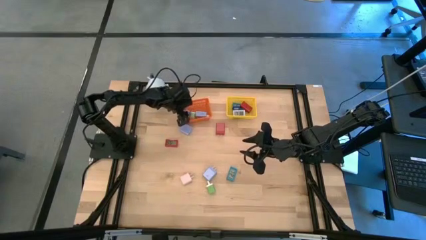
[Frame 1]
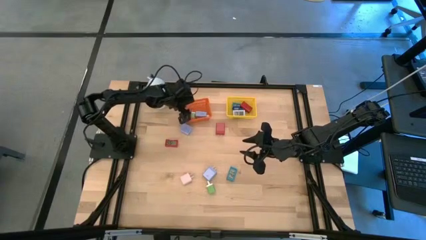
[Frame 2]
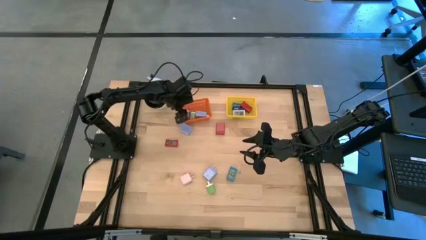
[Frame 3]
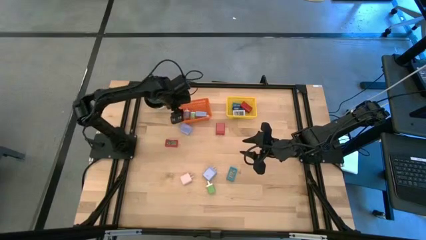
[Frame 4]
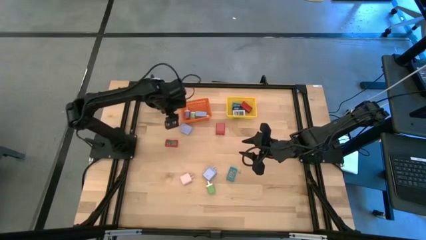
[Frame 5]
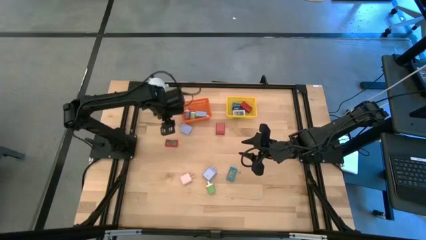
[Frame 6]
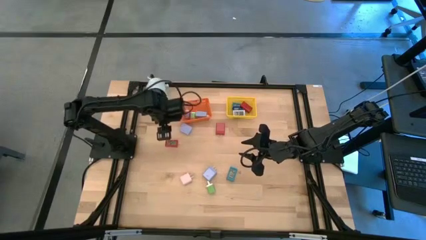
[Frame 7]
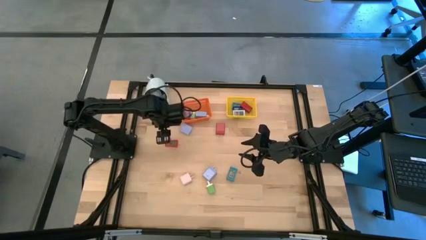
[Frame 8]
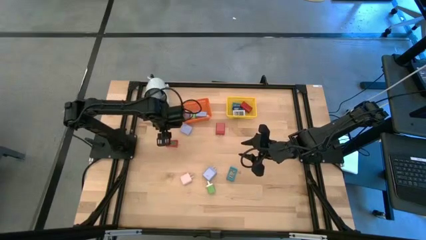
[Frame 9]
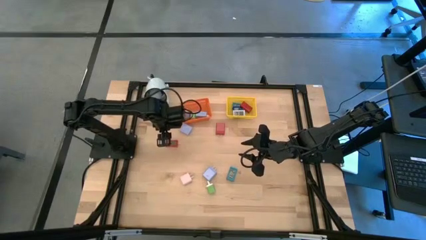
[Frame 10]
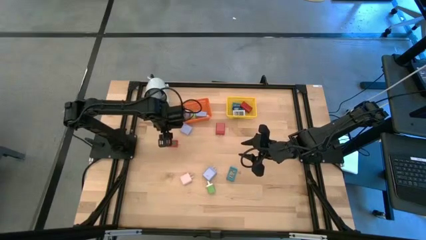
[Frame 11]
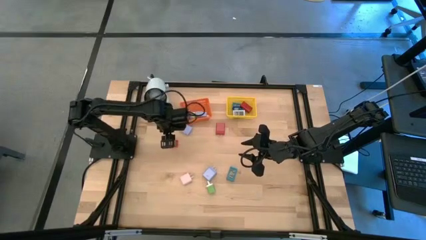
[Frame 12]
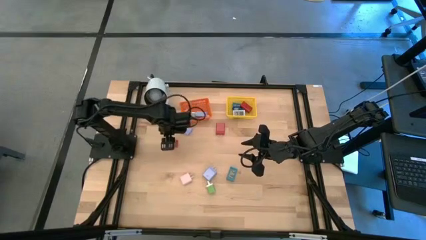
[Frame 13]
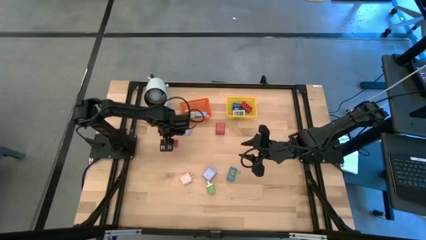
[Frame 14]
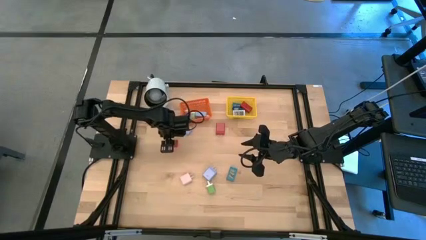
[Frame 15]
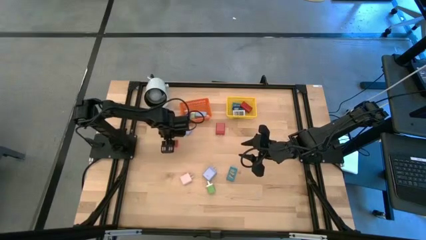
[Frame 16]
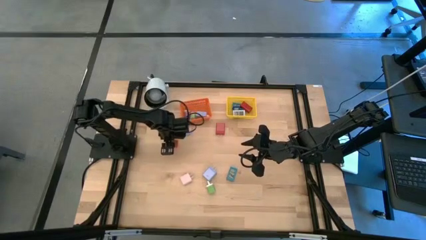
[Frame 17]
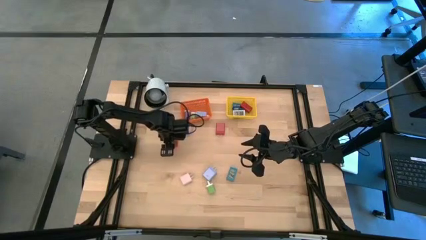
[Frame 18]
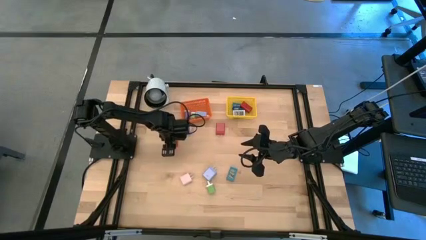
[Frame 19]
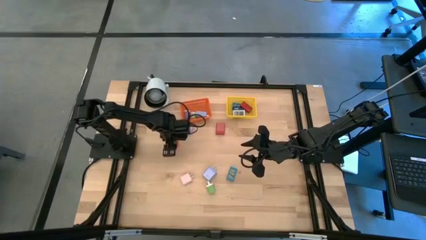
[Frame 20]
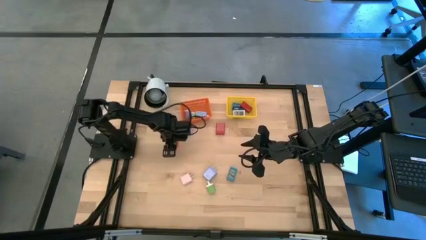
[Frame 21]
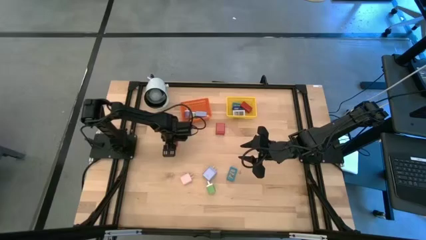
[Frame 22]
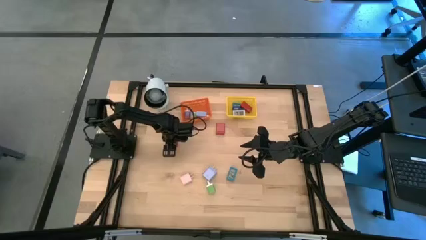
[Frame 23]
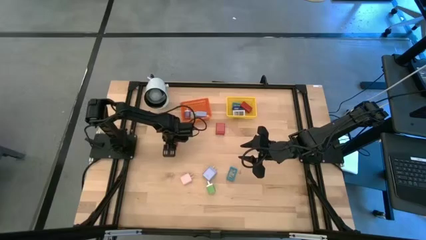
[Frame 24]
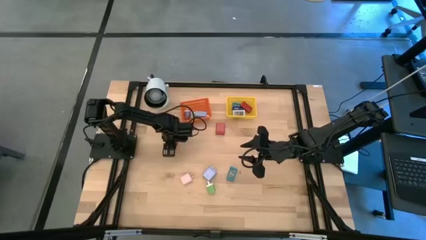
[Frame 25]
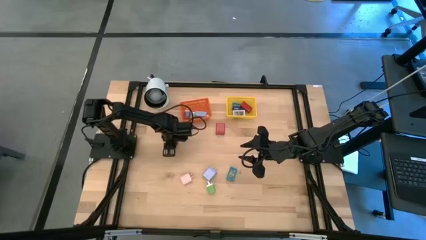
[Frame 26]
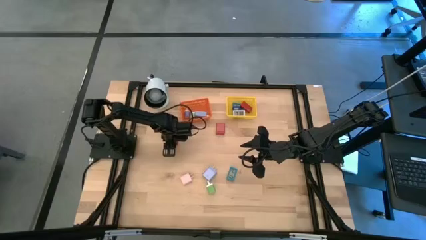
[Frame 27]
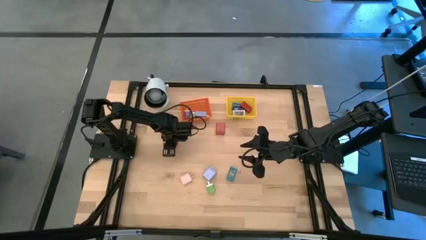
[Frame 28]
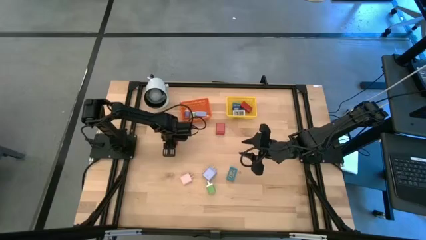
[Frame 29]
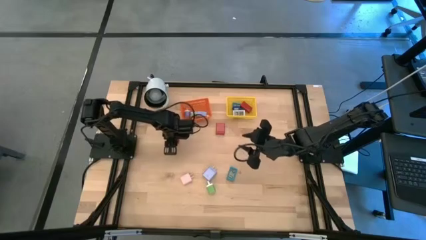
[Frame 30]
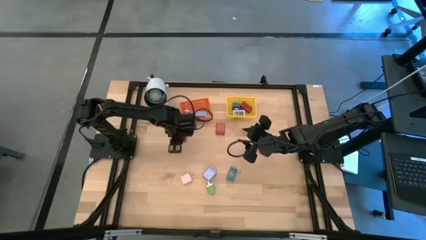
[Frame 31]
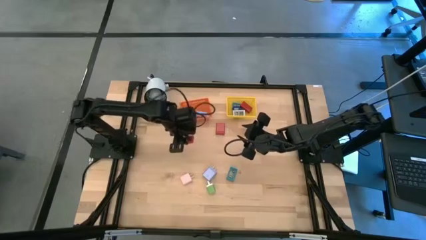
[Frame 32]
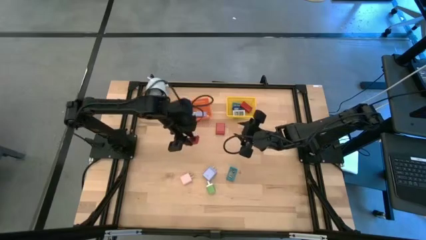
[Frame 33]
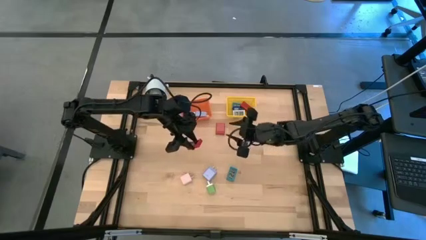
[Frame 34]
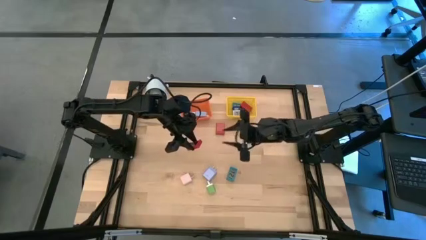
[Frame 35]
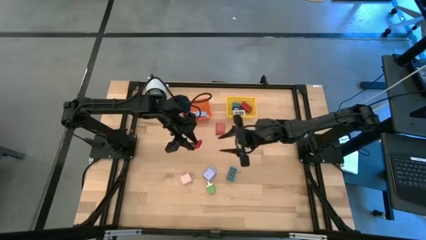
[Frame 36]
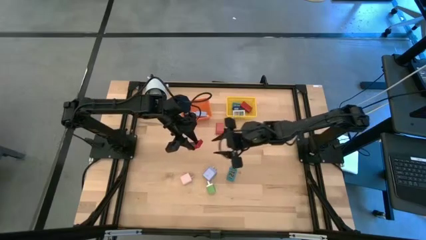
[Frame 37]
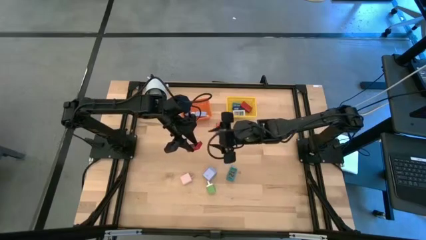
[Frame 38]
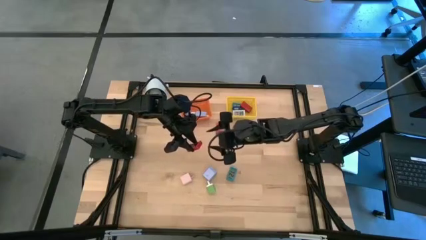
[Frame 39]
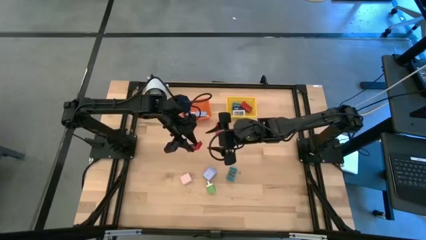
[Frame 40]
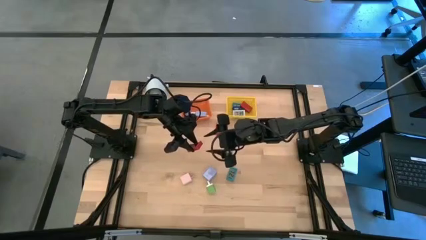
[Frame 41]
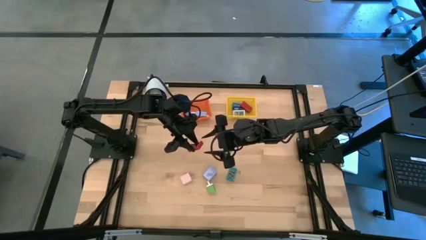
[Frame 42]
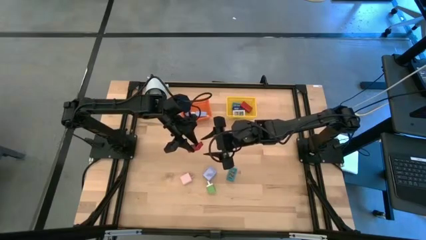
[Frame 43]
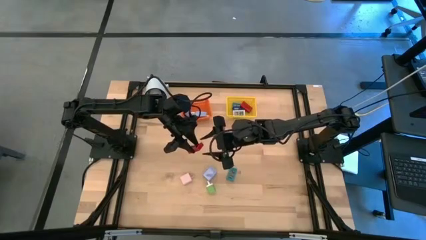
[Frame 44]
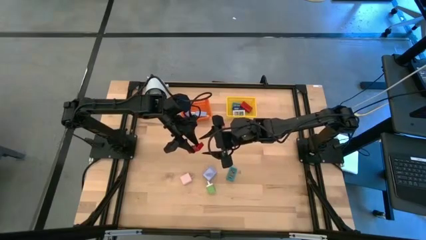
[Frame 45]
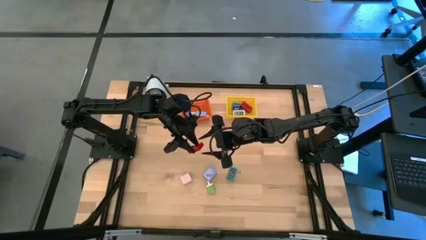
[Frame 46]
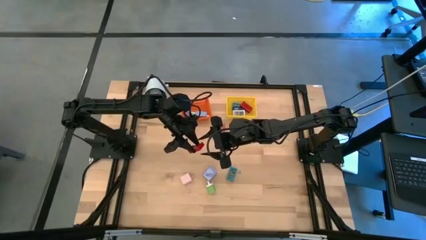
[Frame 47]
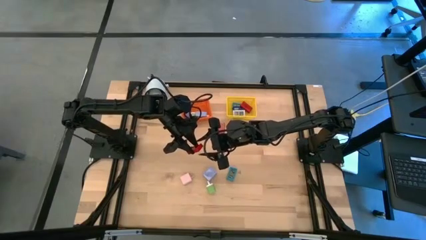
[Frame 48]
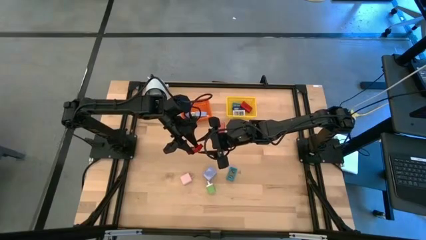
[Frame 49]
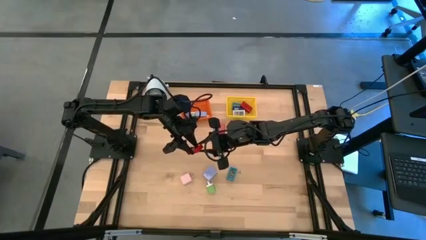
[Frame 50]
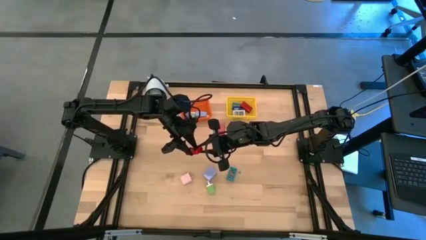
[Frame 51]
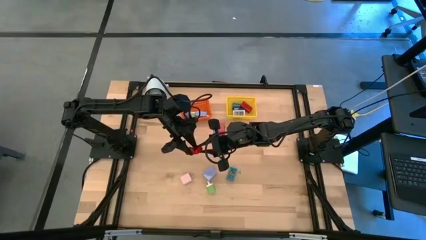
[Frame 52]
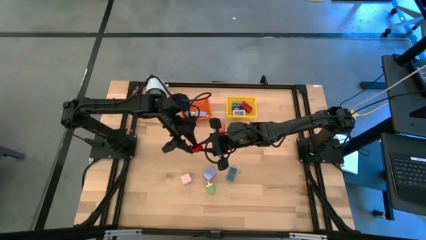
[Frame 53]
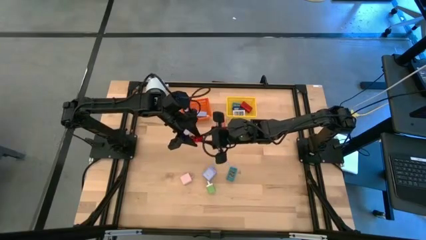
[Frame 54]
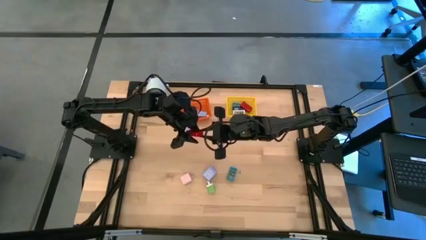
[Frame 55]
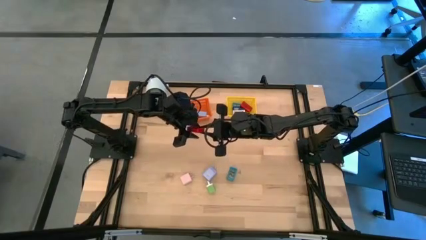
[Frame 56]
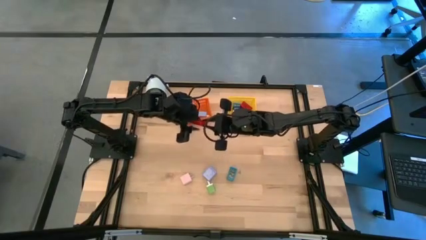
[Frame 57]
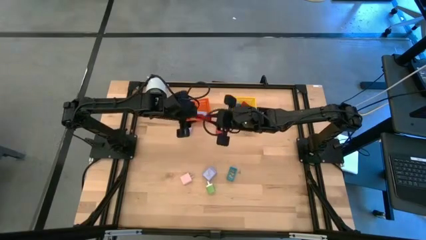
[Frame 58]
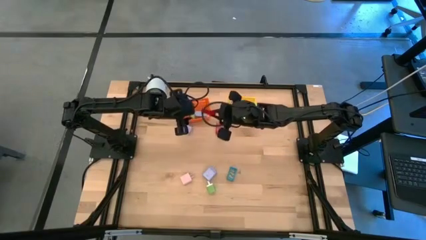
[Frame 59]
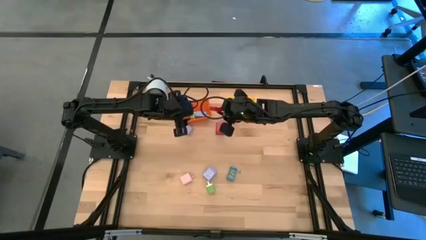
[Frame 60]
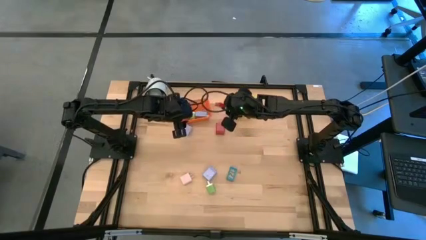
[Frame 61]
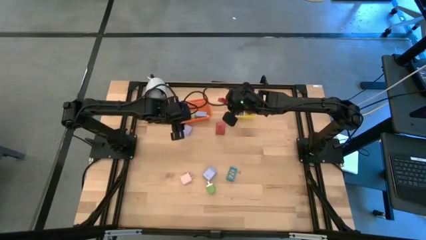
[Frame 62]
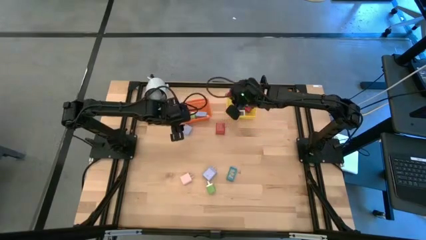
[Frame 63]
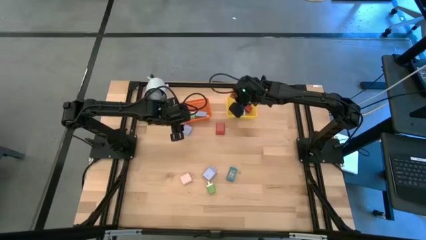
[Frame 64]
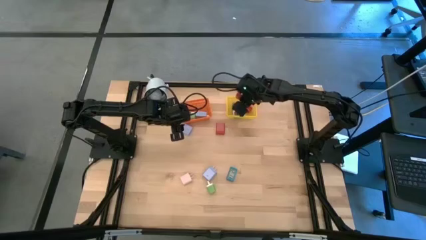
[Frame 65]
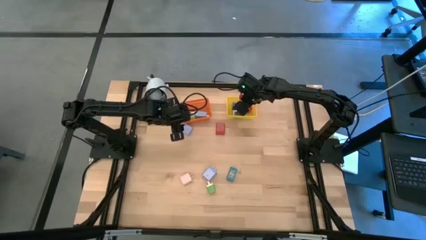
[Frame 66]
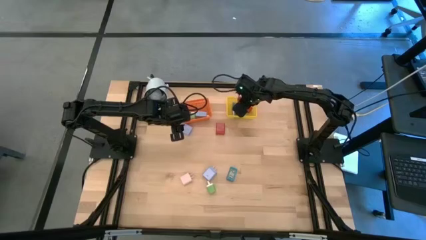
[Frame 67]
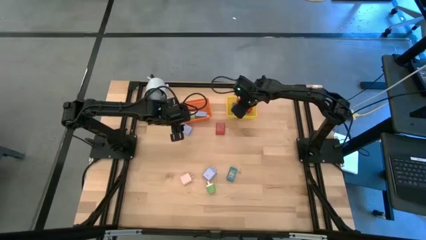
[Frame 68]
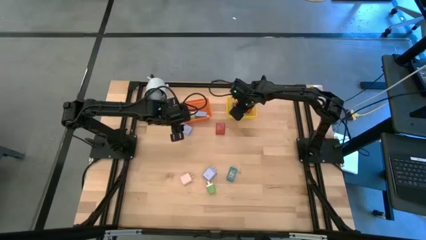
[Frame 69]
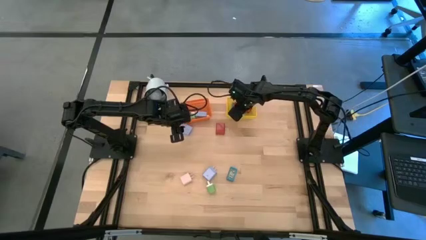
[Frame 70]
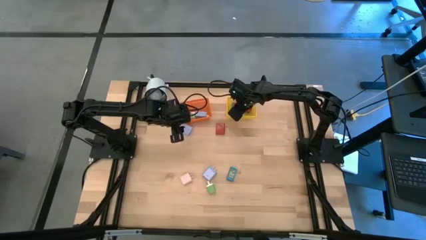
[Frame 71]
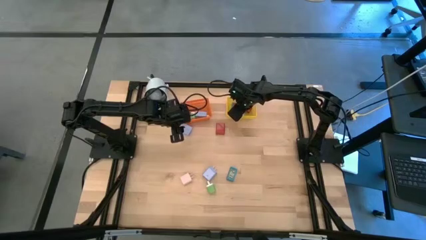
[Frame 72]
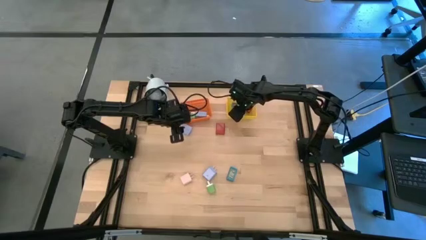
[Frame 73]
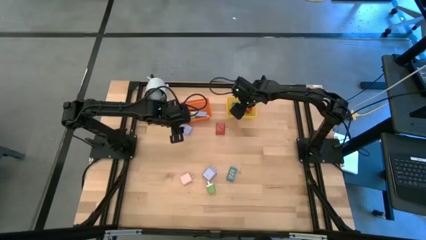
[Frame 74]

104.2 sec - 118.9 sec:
Task: Pick & Place Office items
Put the red digital clock into the yellow bin

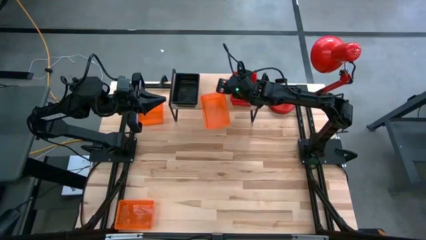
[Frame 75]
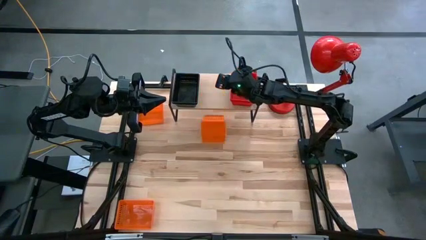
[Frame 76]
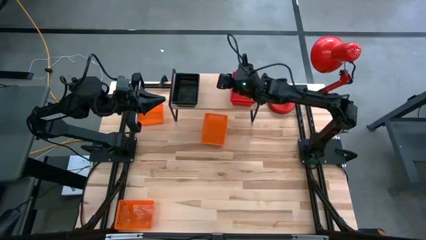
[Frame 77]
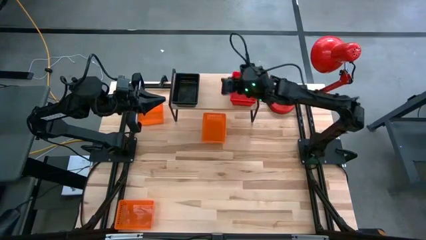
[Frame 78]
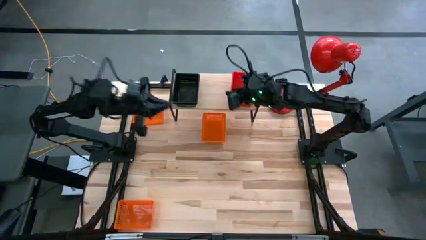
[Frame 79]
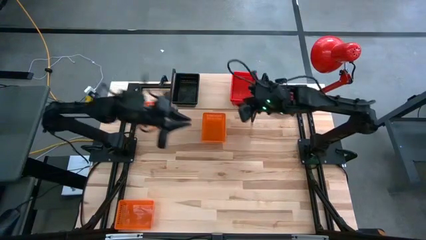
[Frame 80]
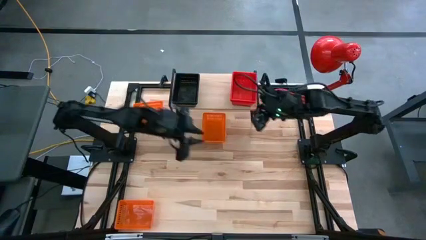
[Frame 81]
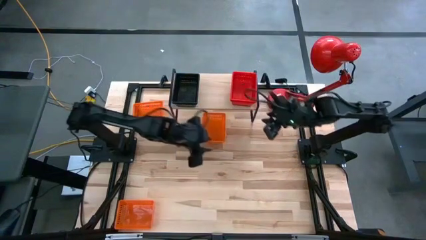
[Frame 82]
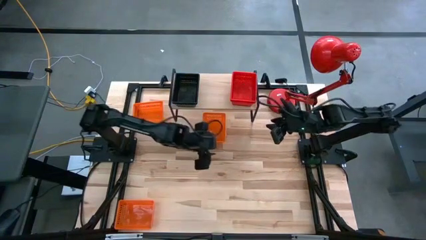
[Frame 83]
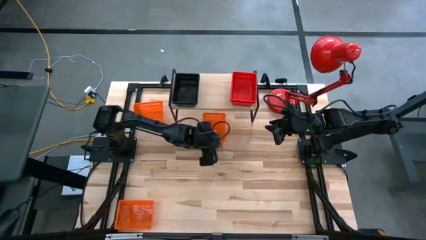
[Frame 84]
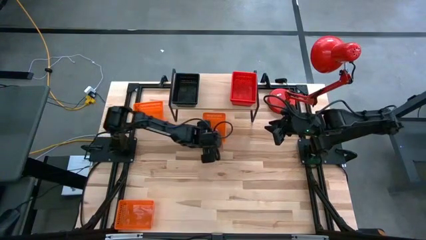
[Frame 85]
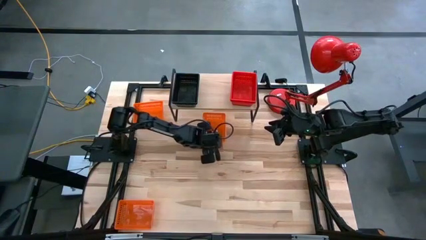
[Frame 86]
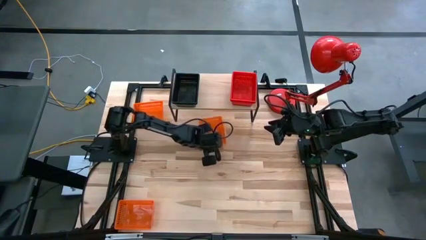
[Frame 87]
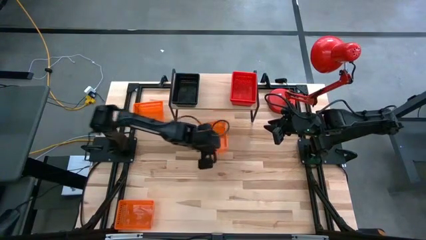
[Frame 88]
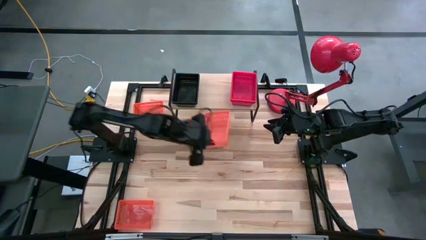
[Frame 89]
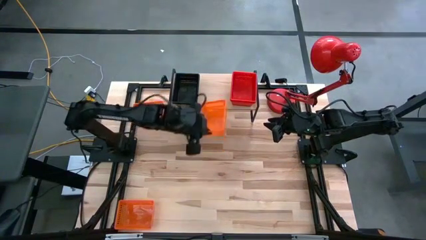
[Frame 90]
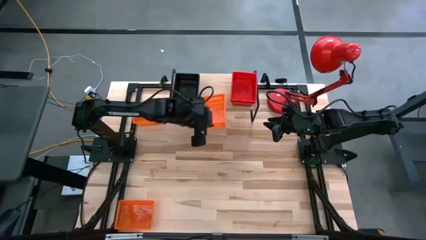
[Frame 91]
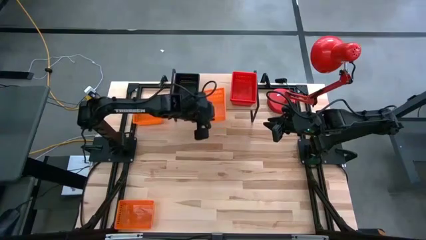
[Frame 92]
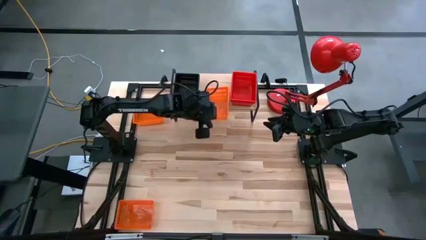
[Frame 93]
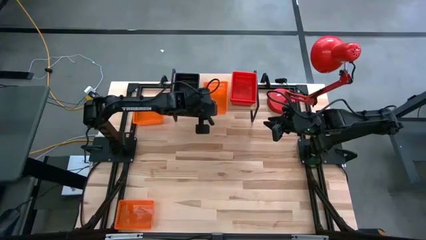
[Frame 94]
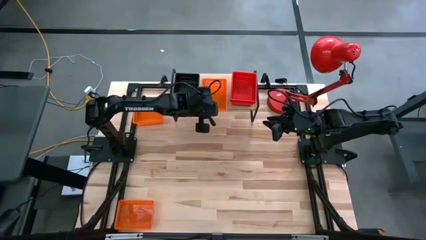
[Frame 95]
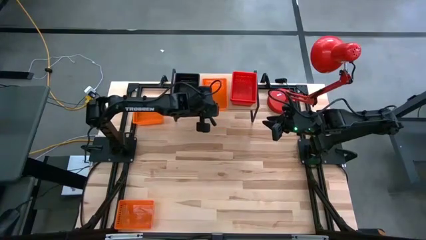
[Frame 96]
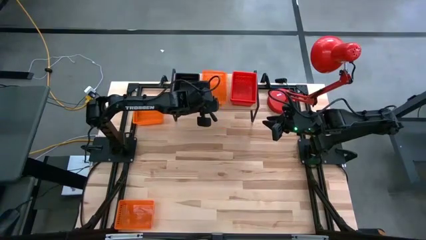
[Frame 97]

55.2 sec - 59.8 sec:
Task: Stack baskets on shelf by color
Put the right orange basket on the shelf
